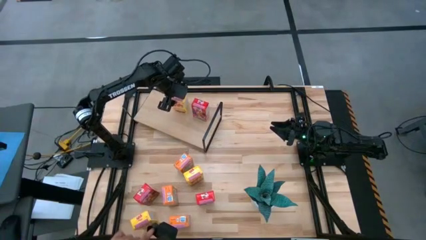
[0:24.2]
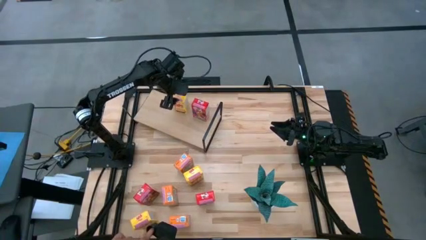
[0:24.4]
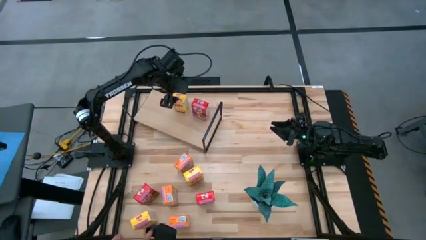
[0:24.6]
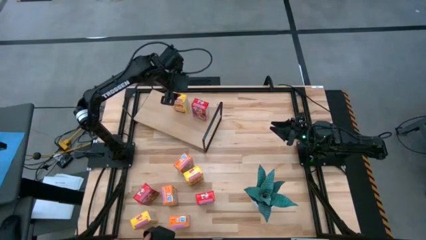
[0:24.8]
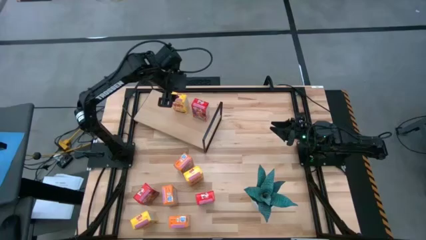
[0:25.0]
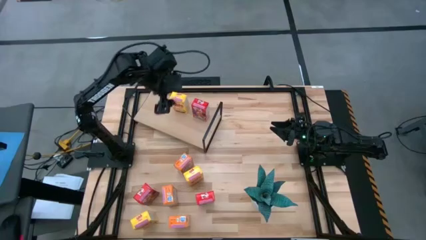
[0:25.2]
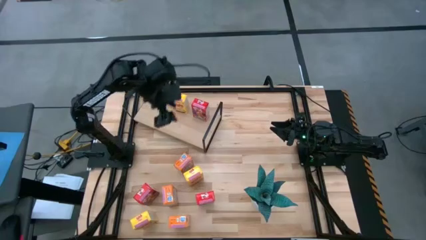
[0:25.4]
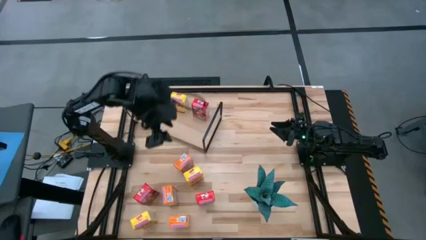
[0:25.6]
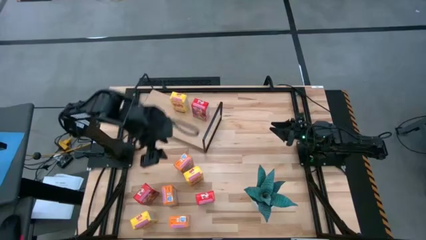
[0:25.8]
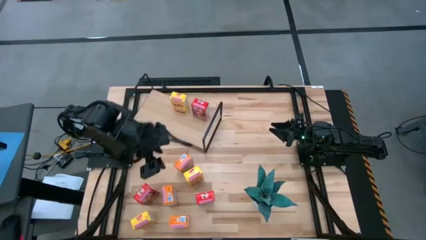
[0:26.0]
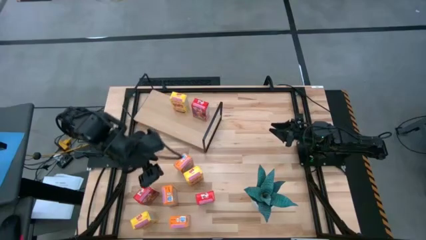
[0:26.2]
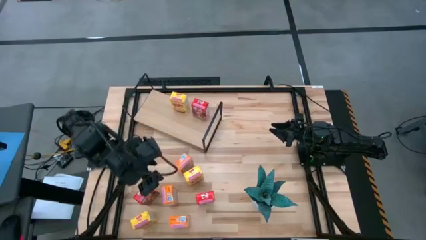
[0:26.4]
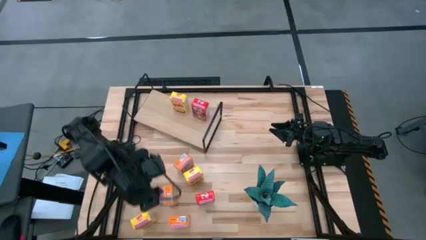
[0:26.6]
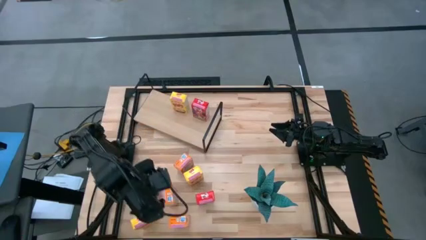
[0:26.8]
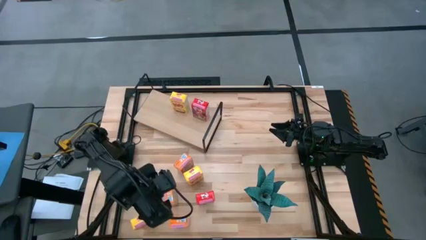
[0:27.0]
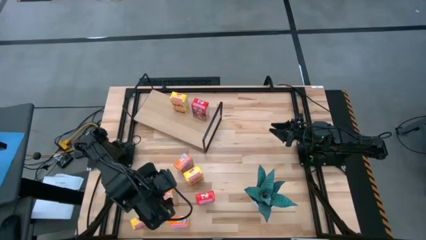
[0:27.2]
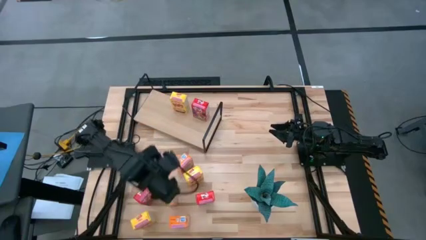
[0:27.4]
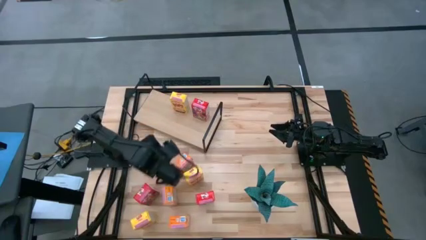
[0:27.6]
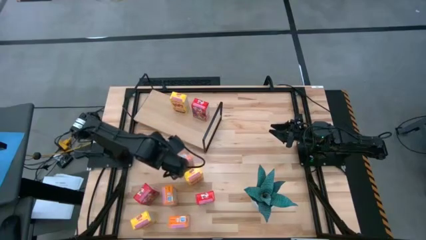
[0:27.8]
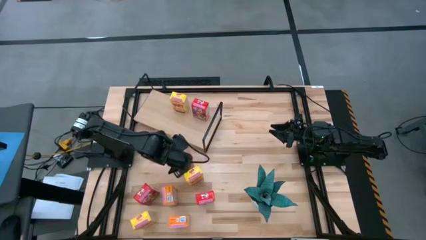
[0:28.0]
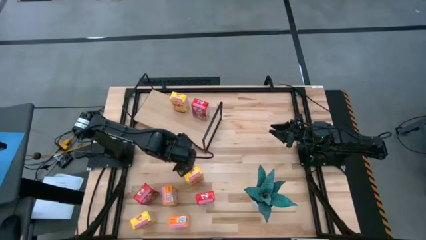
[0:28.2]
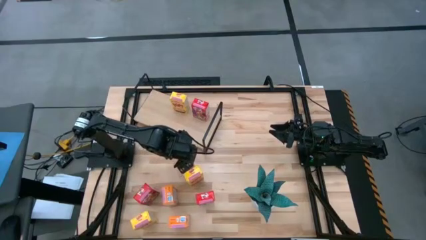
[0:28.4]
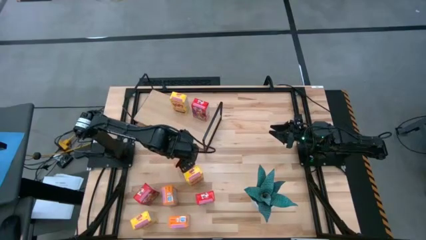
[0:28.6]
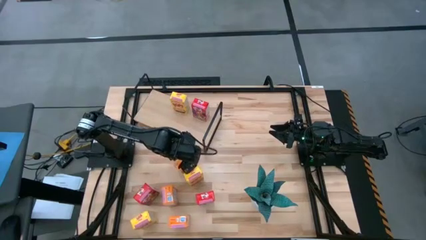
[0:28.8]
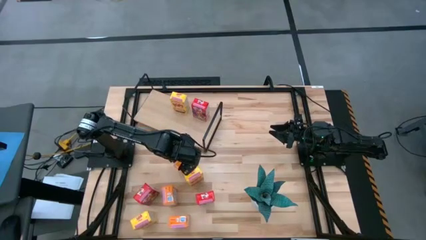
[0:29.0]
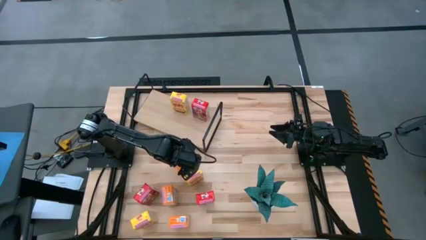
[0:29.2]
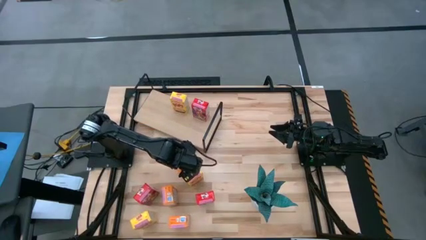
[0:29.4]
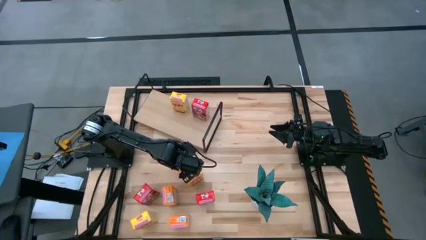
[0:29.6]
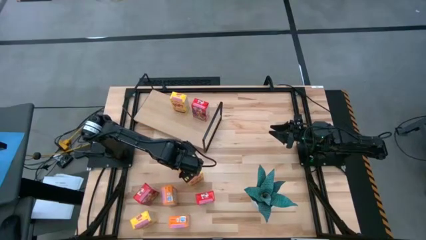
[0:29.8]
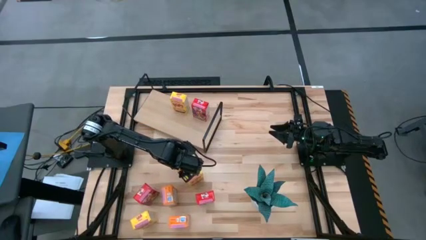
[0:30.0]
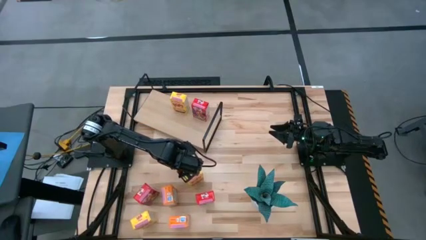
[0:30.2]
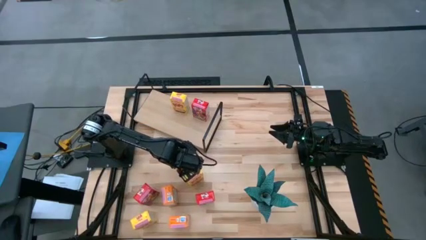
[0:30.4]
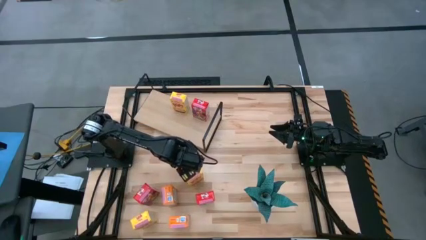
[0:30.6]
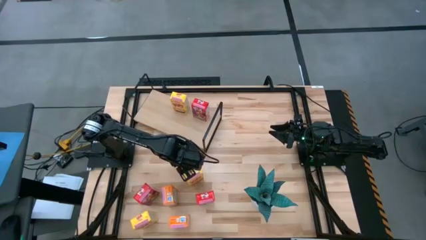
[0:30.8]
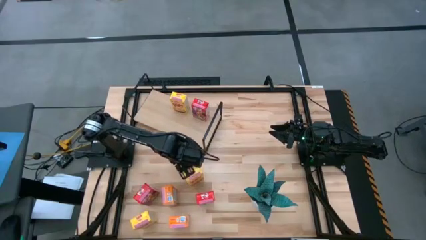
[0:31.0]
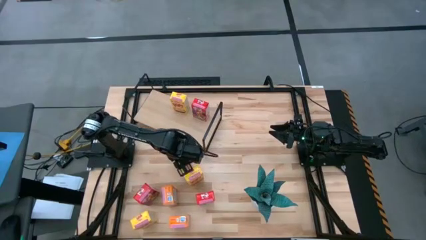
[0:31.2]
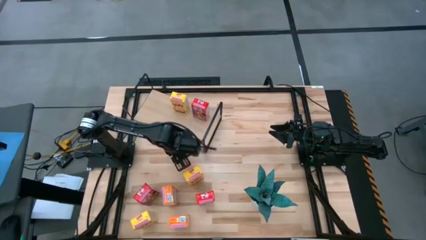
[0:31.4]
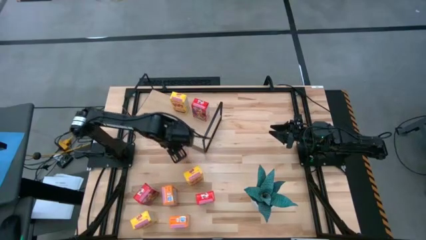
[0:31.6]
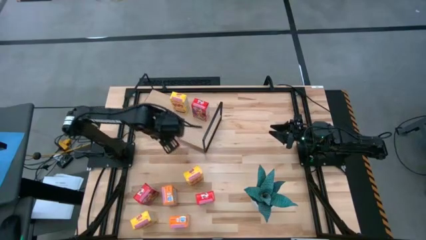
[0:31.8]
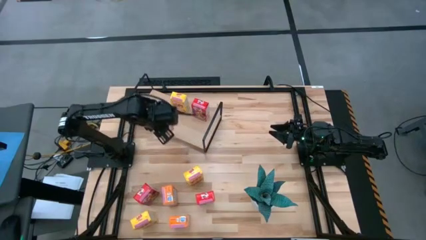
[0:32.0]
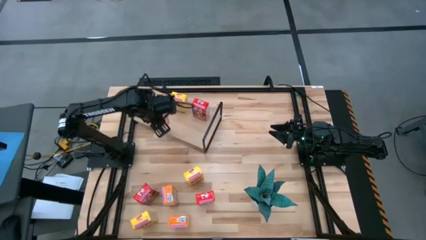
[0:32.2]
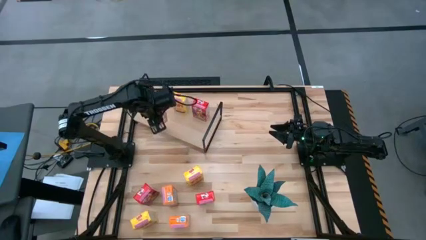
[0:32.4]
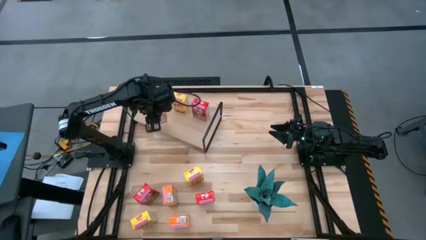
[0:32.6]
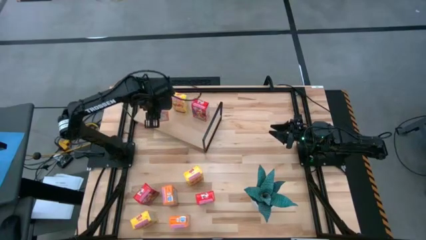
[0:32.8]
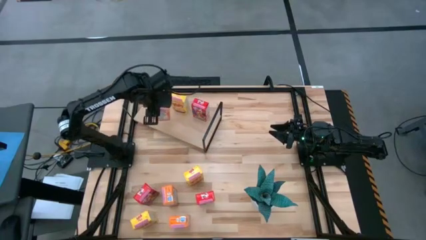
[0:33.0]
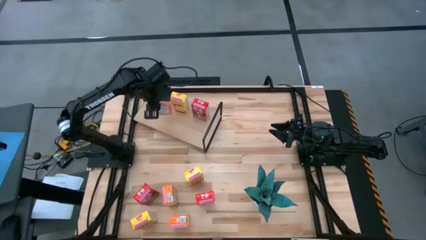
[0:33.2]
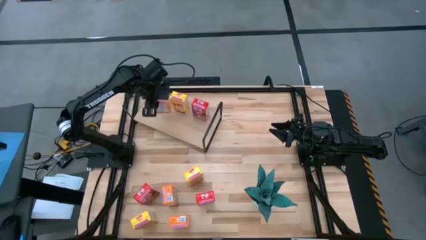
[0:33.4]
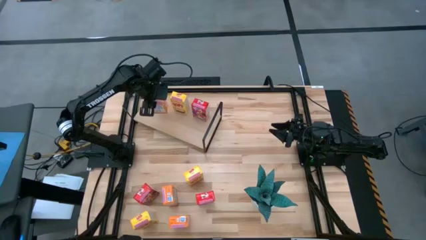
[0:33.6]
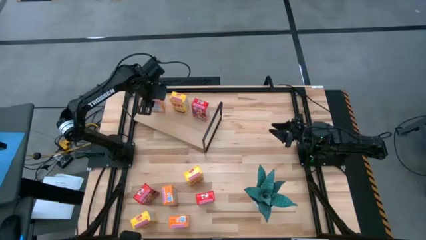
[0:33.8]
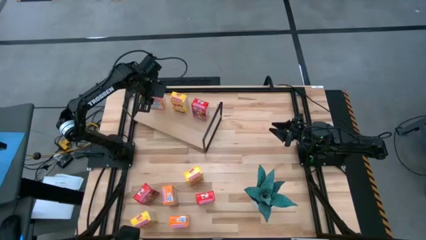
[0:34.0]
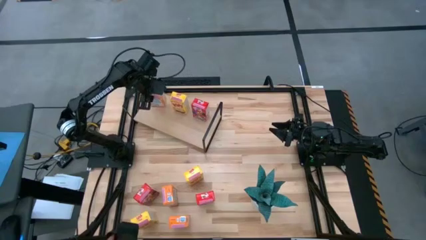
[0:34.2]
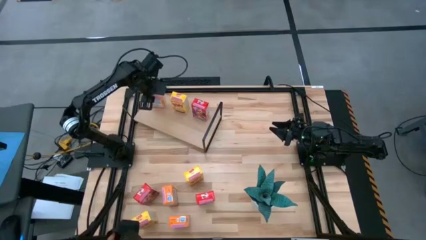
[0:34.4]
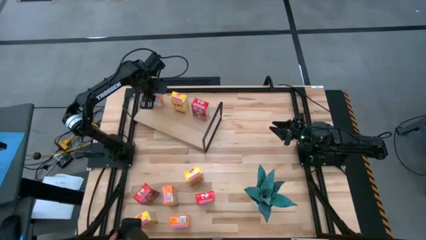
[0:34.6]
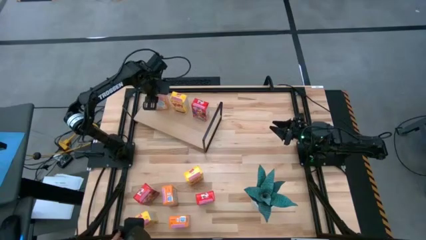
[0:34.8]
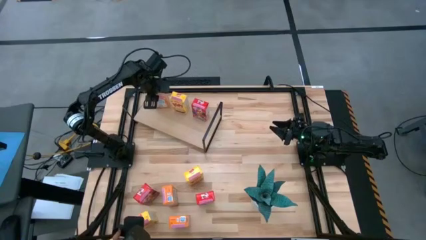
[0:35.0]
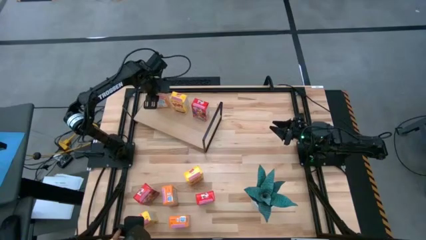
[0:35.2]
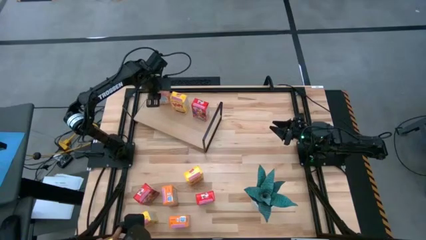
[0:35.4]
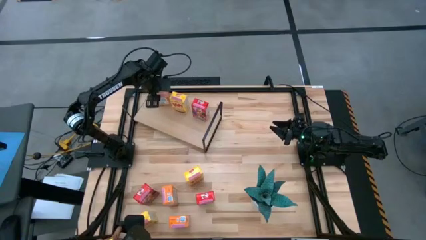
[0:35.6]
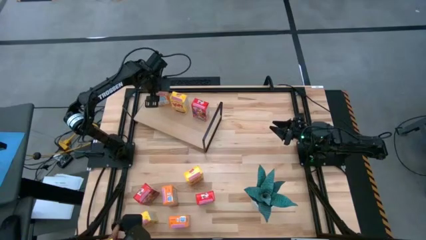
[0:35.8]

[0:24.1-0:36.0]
Task: Stack cereal on shelf
Put the top orange cereal box on the shelf

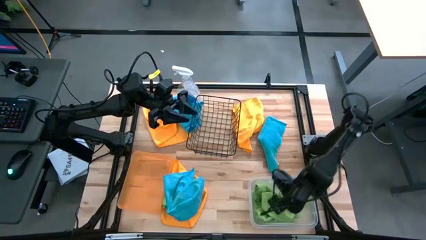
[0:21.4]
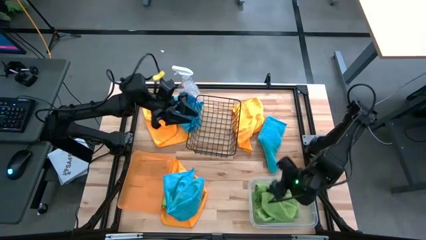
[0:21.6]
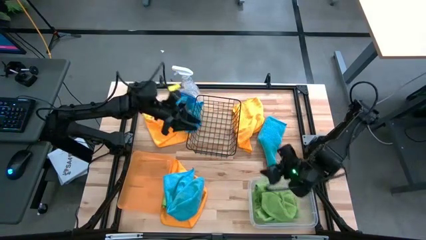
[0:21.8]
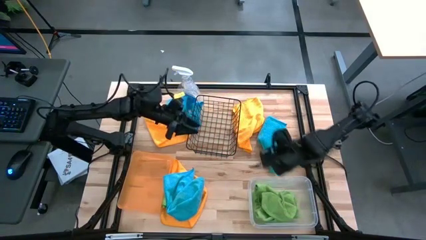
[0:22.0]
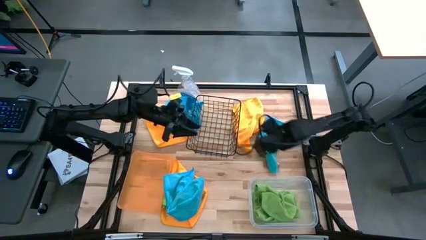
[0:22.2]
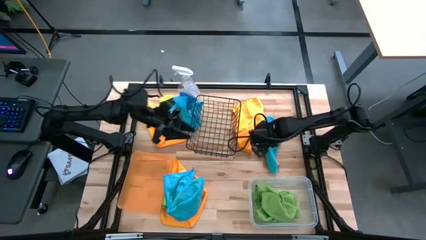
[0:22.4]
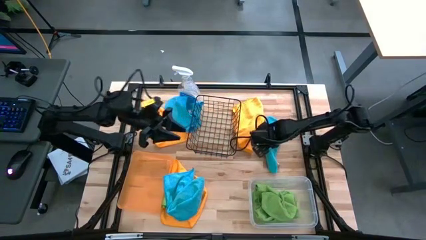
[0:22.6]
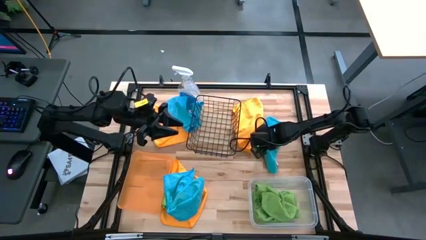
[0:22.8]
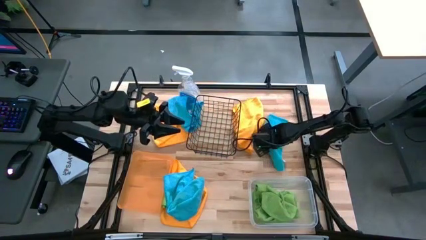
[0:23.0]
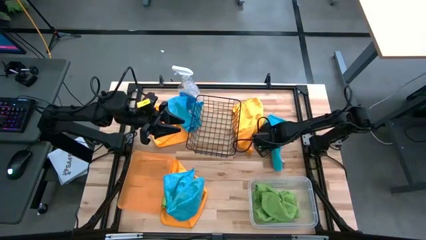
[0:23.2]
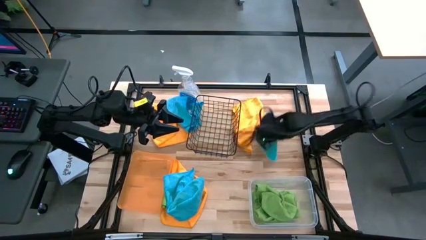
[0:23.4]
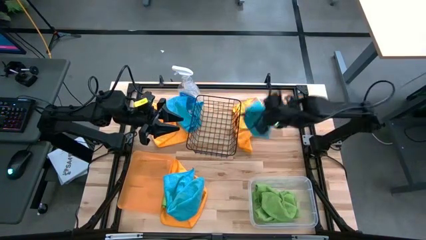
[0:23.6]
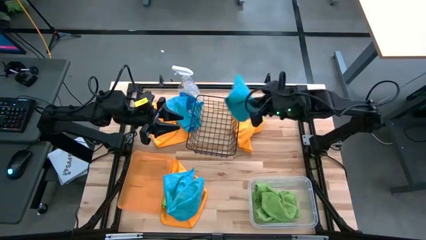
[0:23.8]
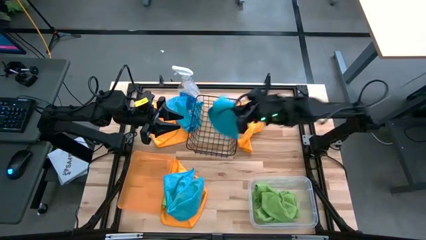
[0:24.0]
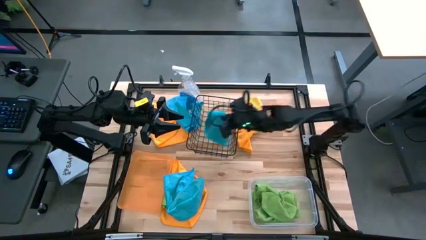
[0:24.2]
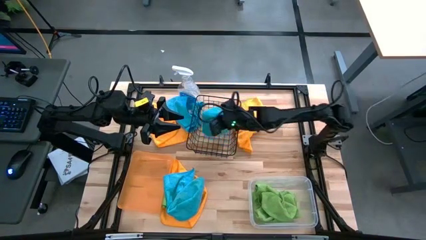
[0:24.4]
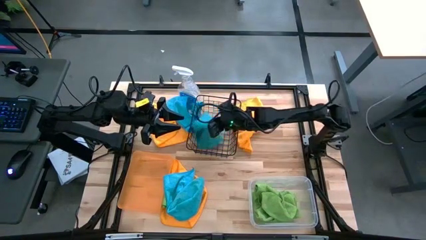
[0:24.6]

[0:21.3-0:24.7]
Task: Sort microfiber towel by color & place in baskets
Put the top right blue microfiber towel into the black wire basket

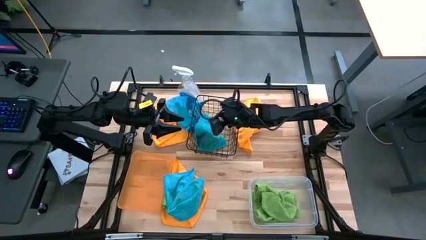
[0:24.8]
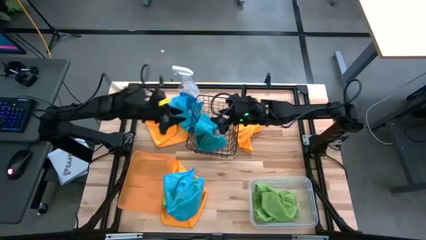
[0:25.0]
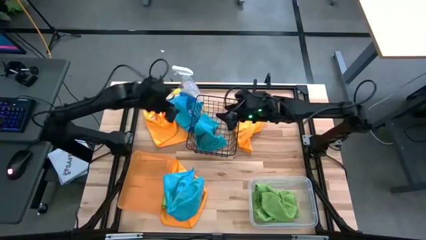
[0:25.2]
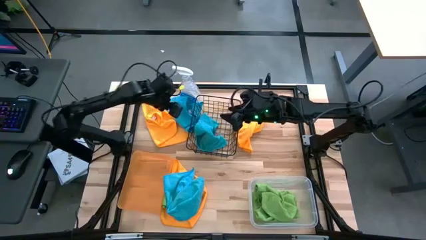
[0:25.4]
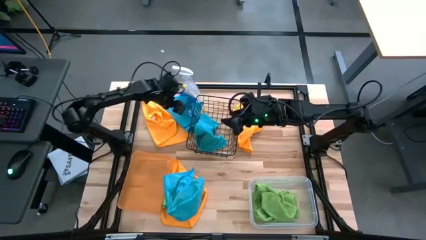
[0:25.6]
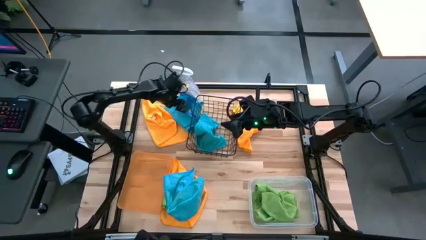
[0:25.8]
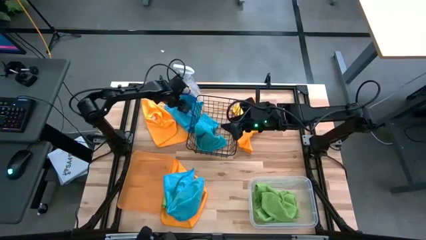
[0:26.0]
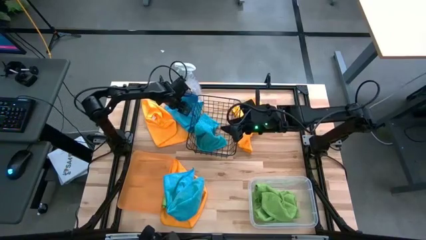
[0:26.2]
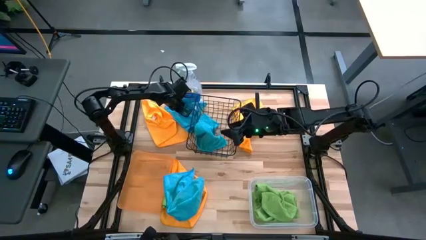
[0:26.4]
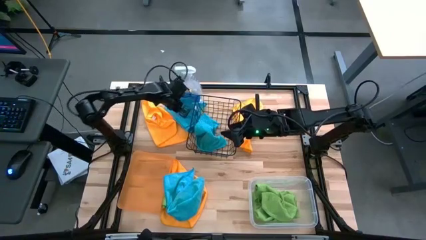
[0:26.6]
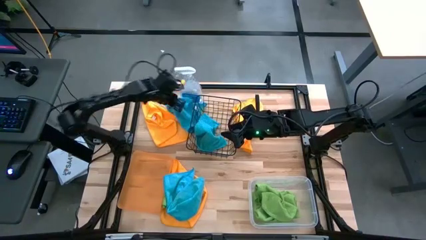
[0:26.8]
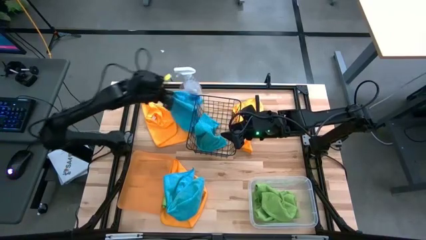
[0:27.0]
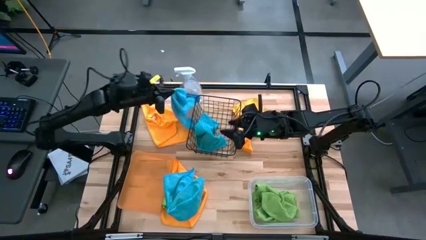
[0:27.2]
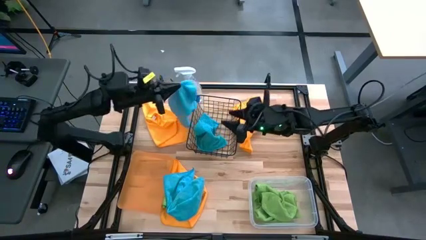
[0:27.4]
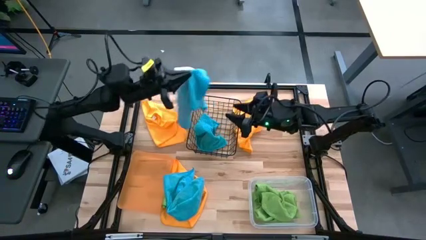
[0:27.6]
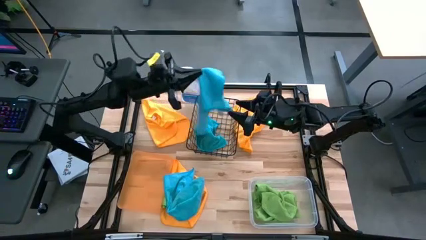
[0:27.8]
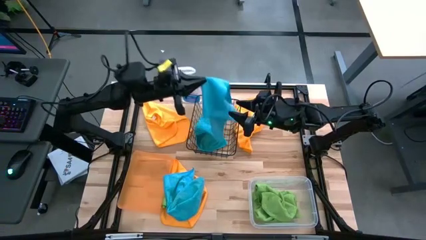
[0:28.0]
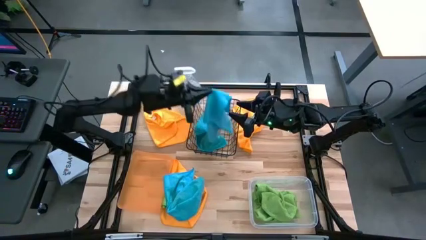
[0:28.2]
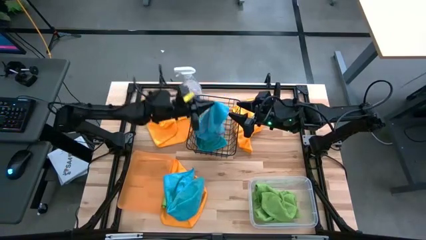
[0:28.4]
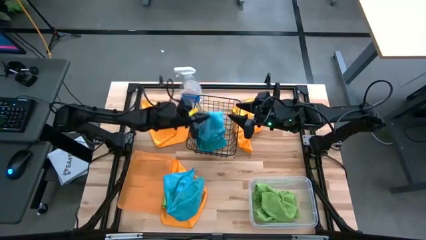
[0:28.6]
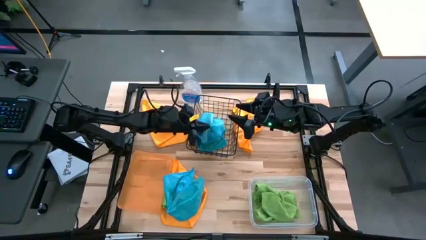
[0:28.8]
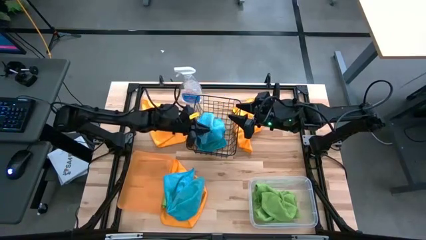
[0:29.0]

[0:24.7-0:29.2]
Put the top blue microfiber towel into the black wire basket
